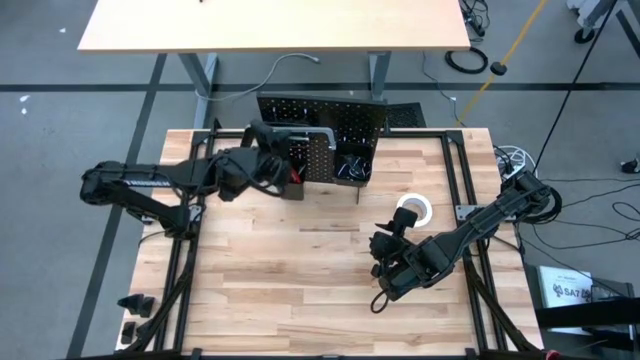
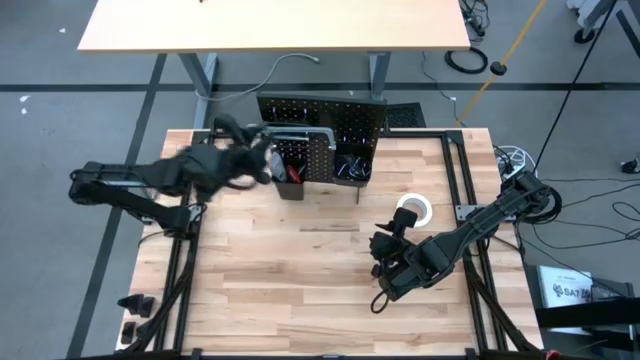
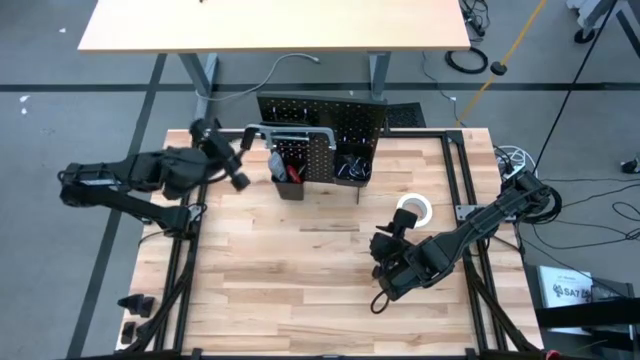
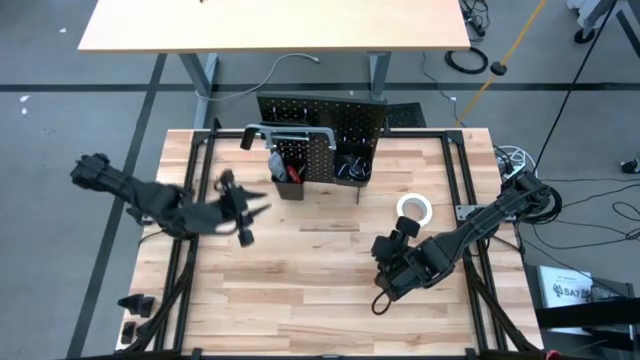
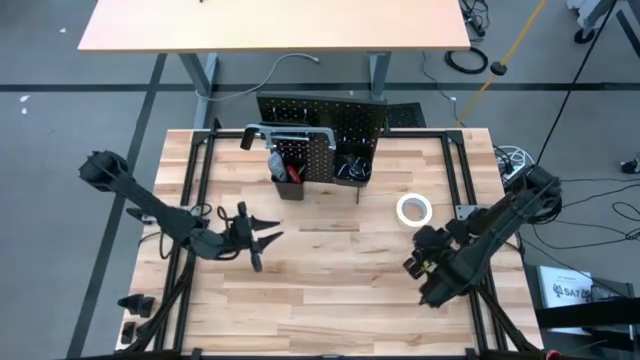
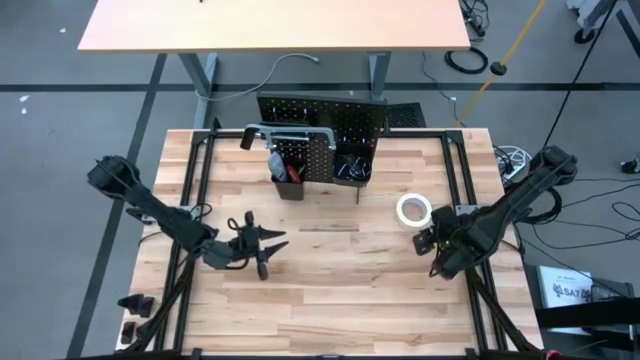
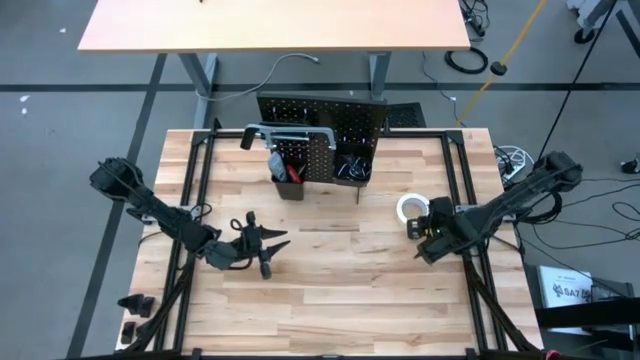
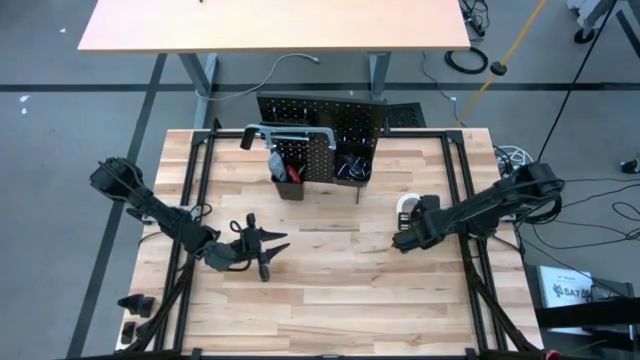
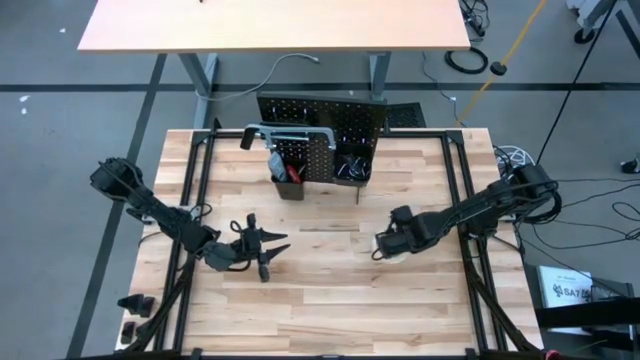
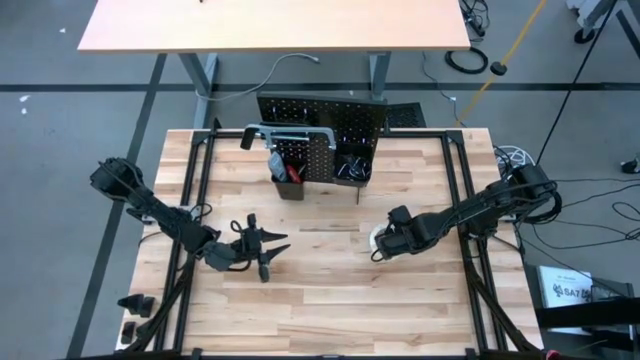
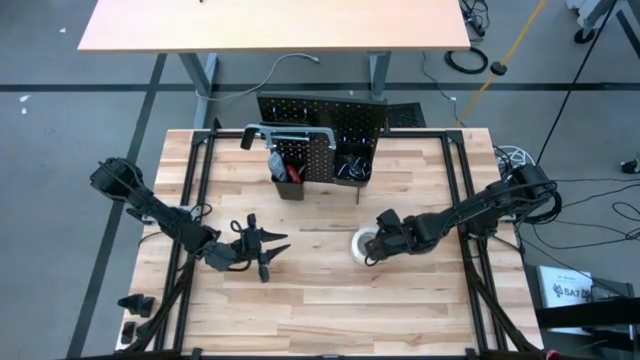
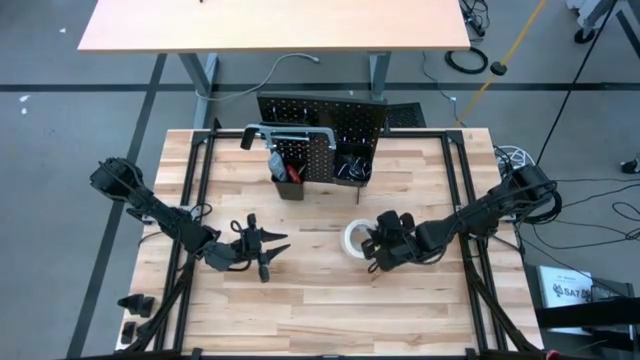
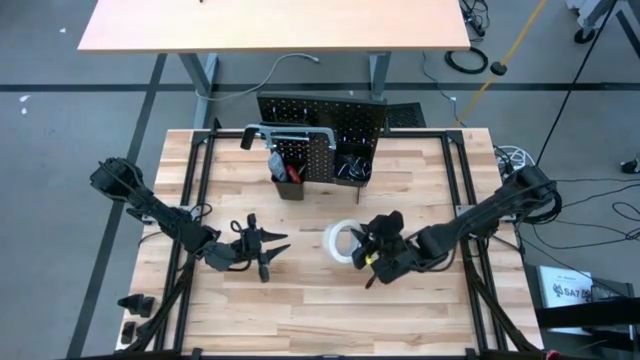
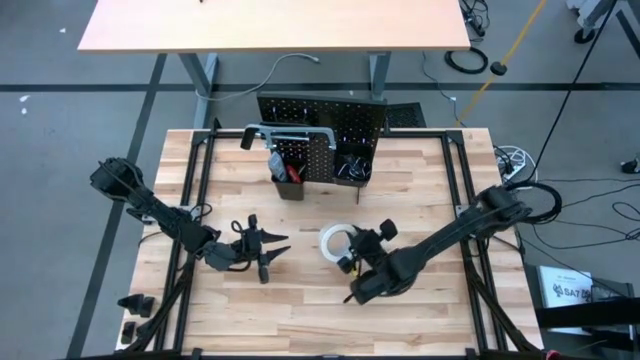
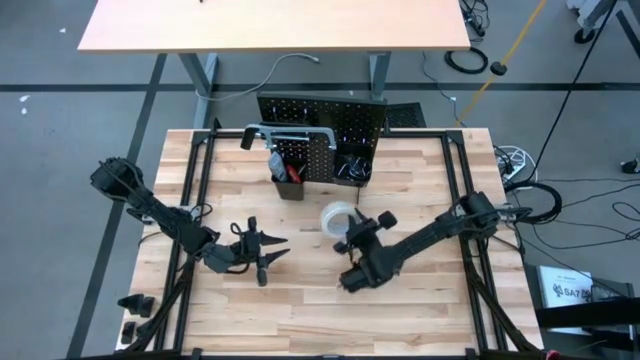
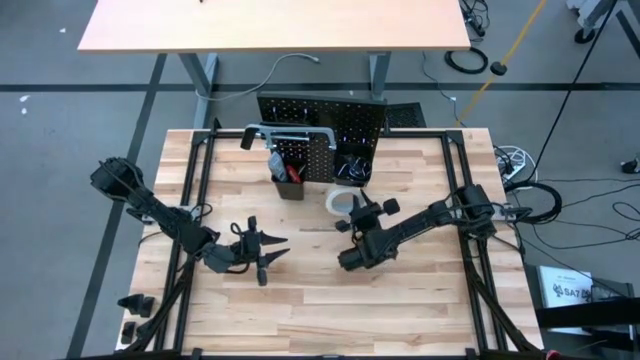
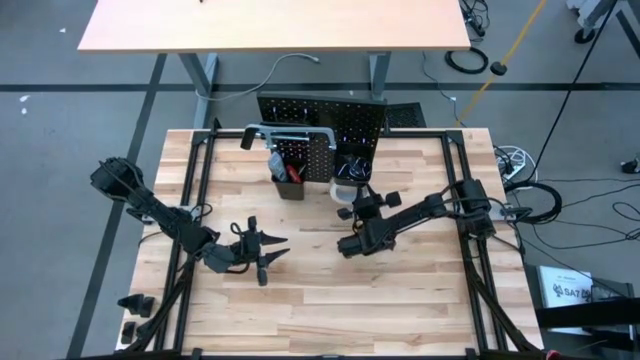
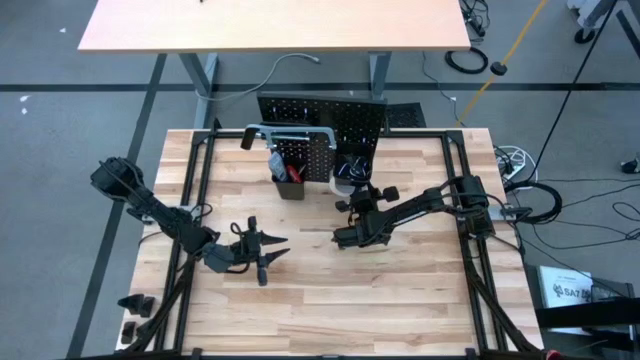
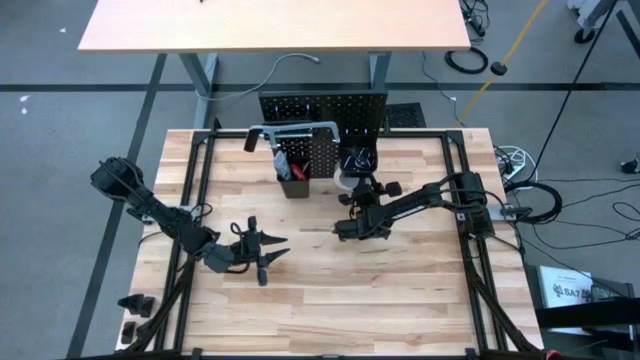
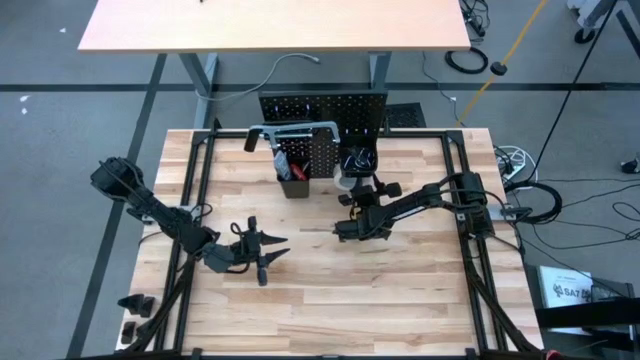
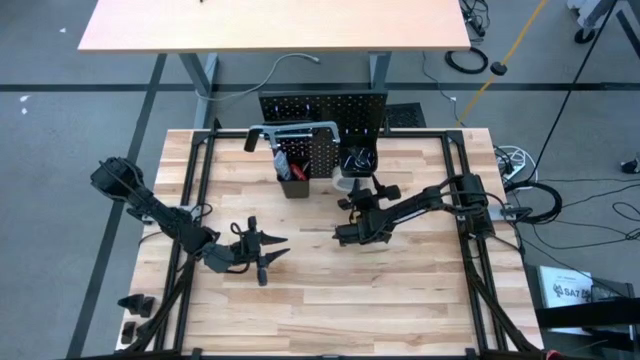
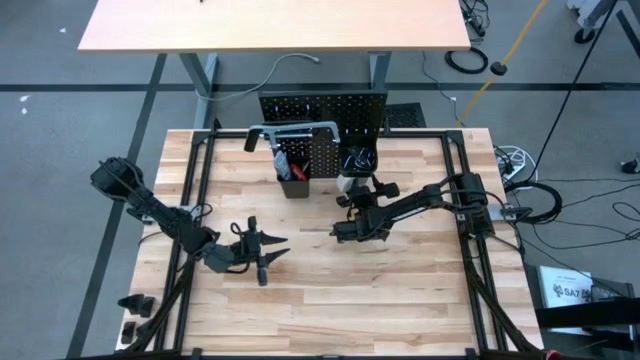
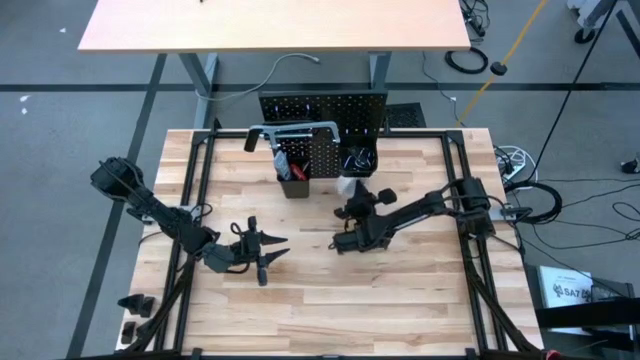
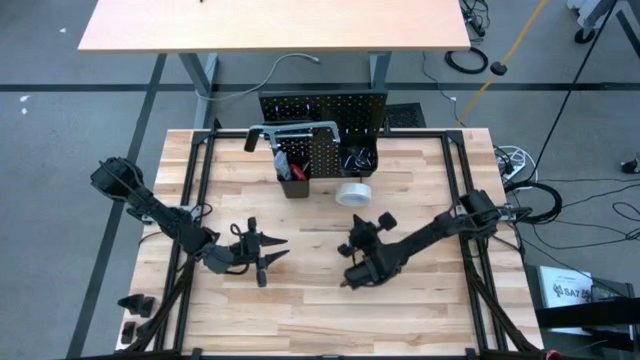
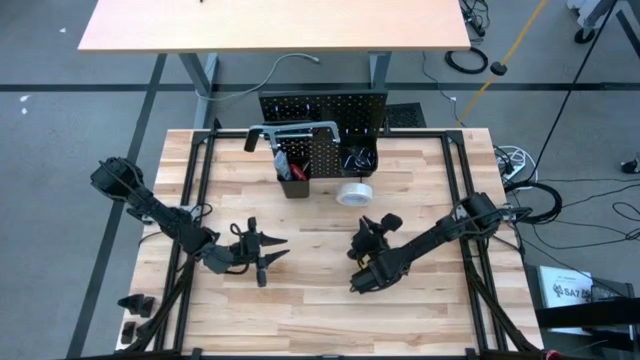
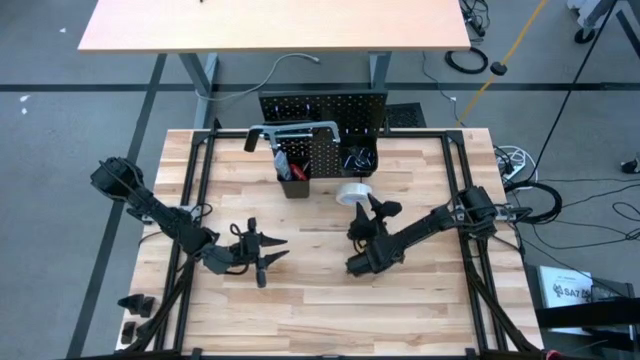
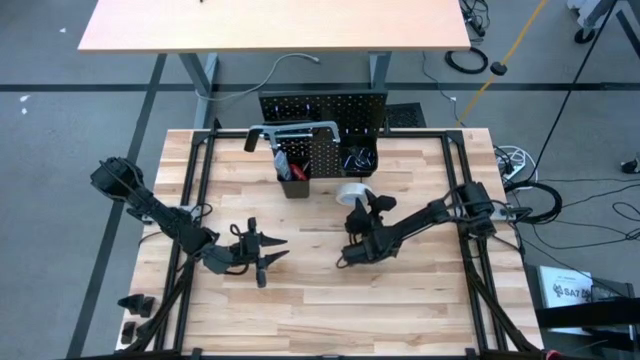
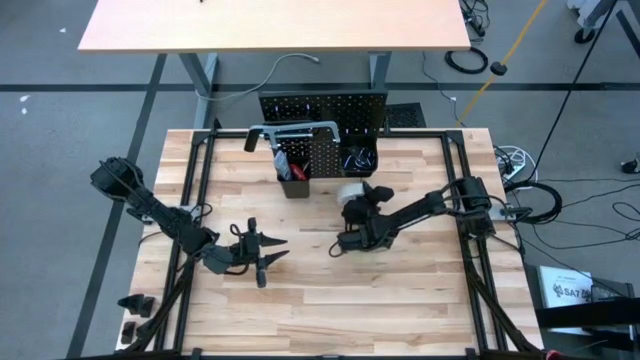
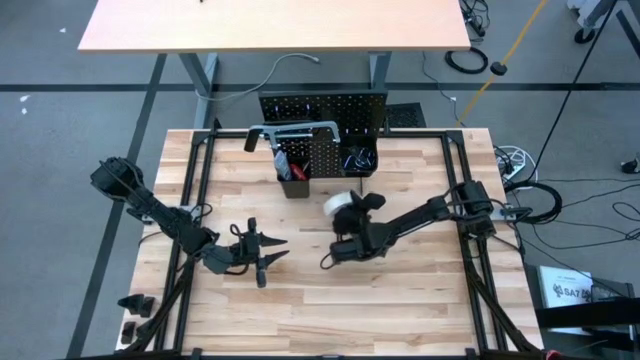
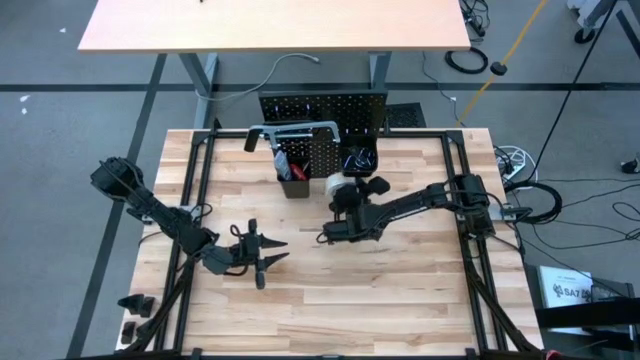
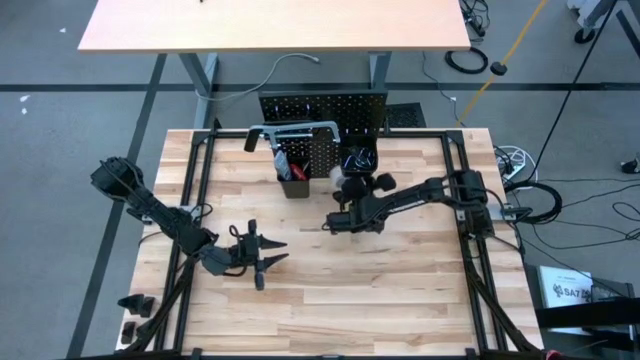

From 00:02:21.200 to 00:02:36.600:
Task: Hang tools onto peg board
Hang the white tape on the peg board

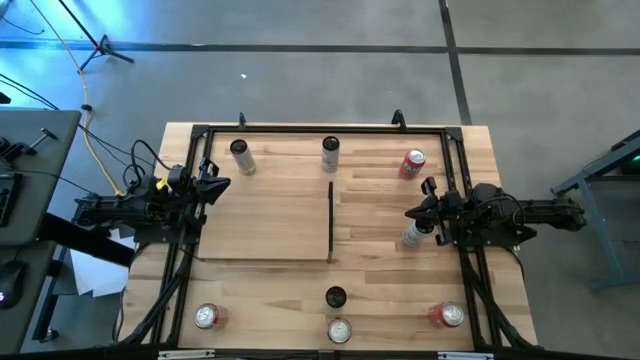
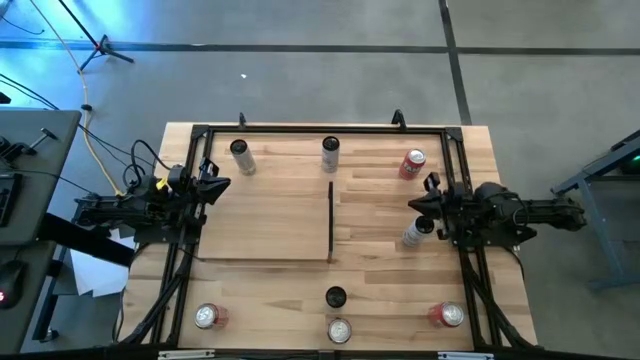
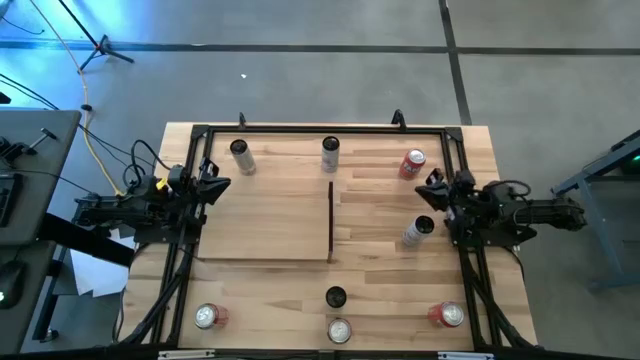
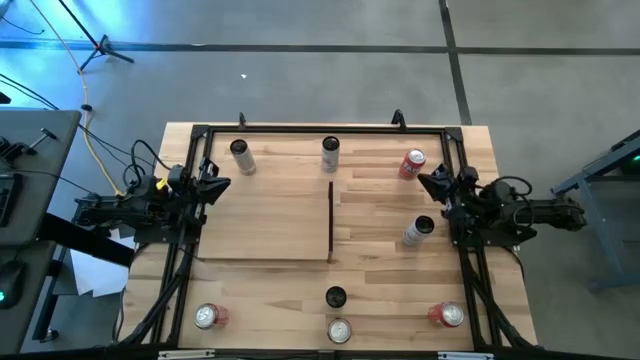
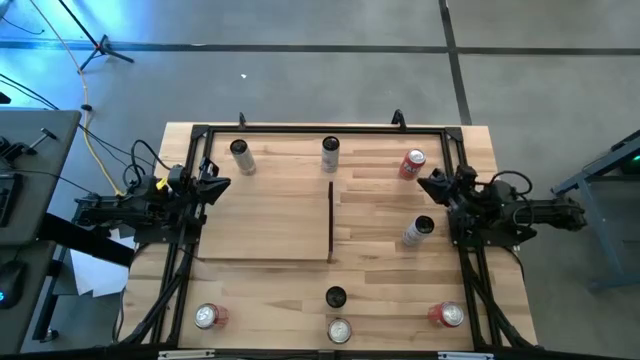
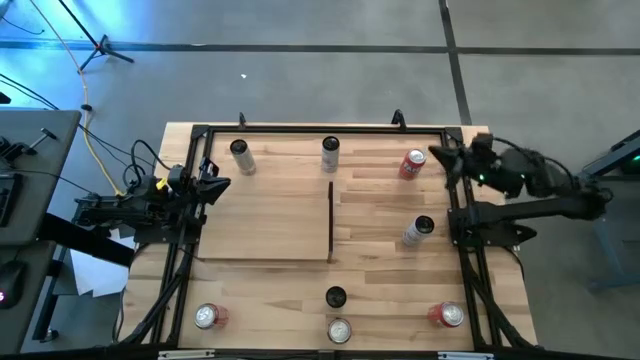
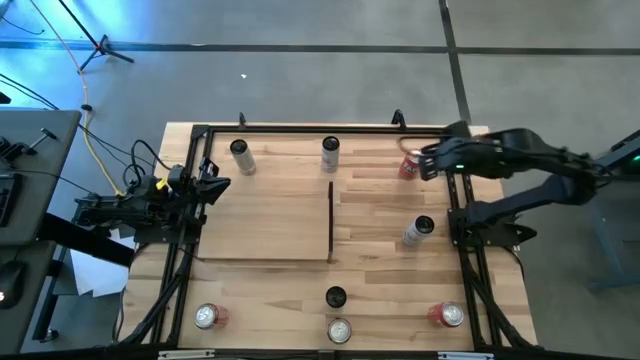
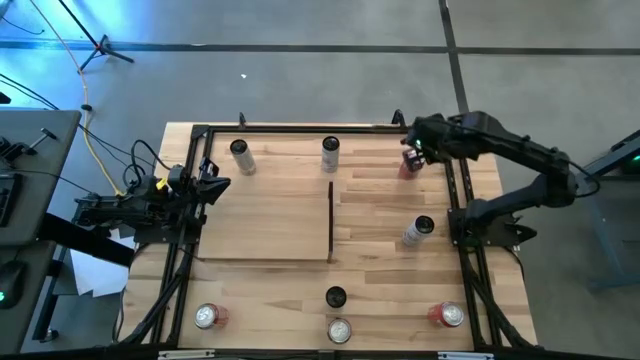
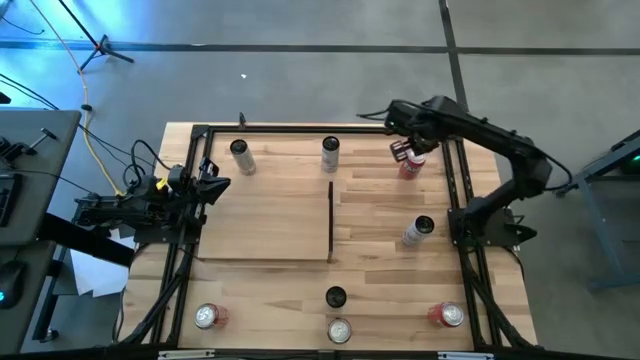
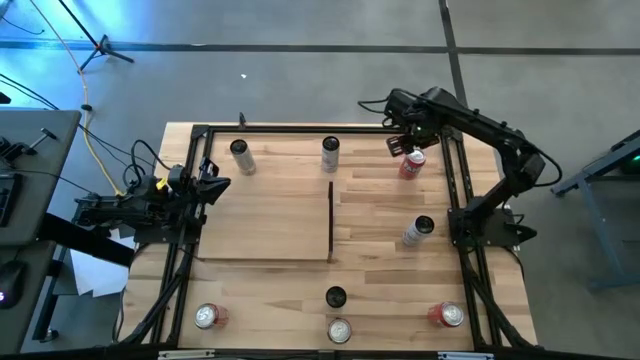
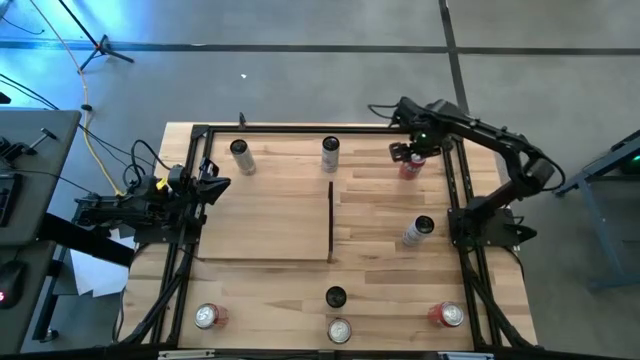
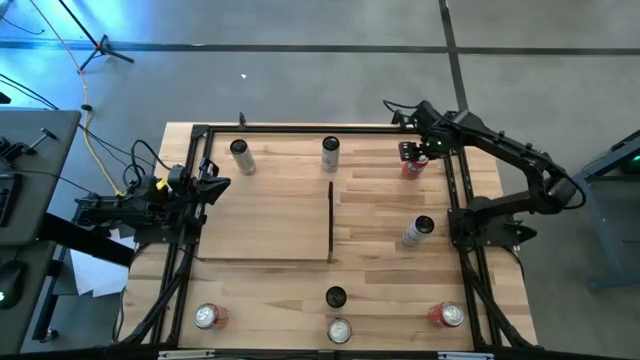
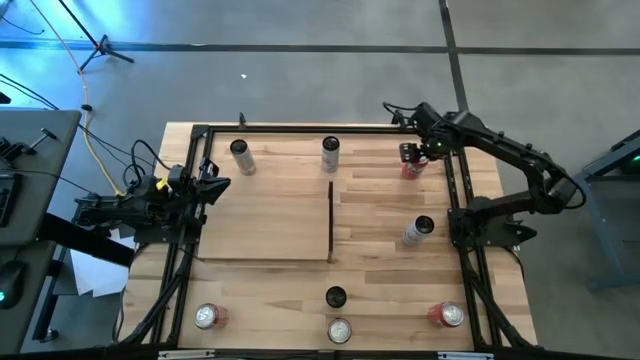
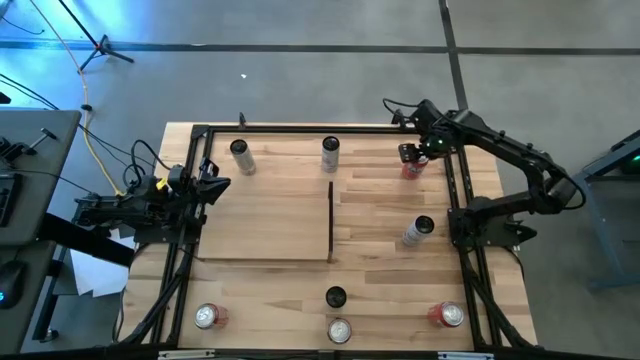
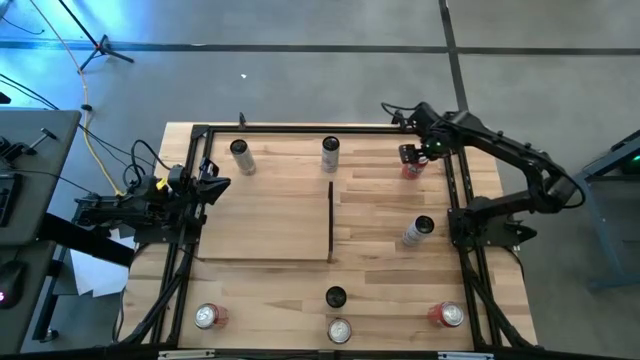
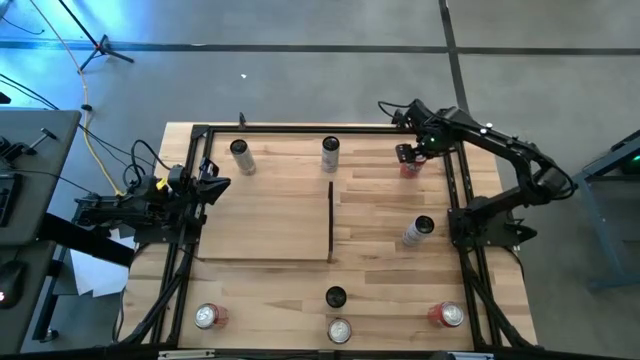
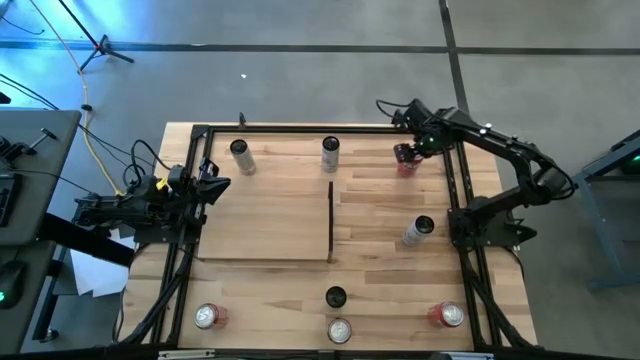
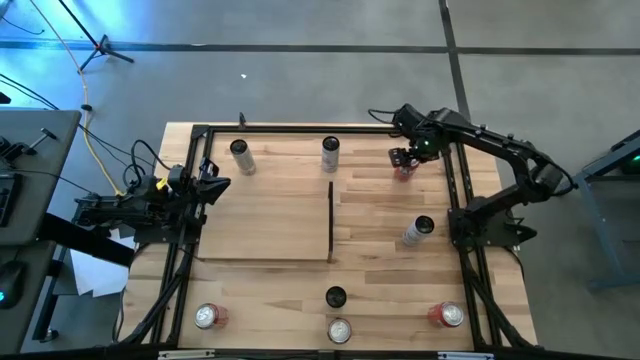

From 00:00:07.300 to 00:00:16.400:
Task: Place canned beverage on shelf
Put the top red soda can on the shelf
